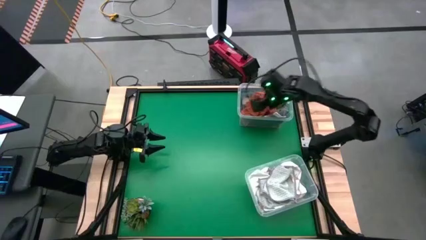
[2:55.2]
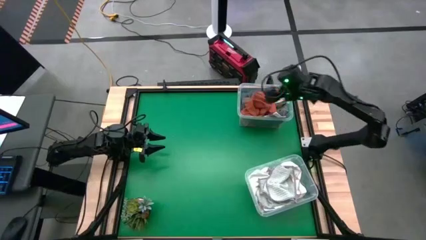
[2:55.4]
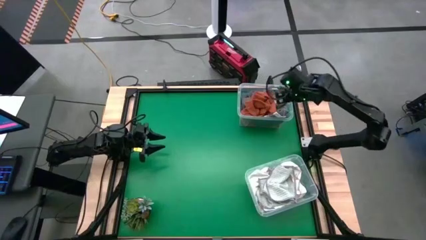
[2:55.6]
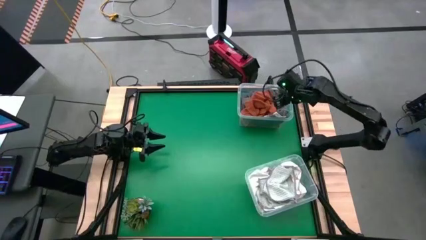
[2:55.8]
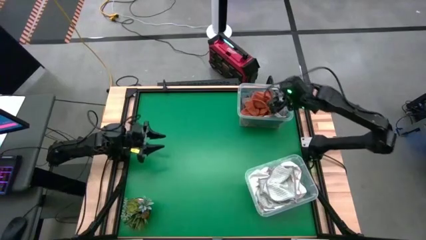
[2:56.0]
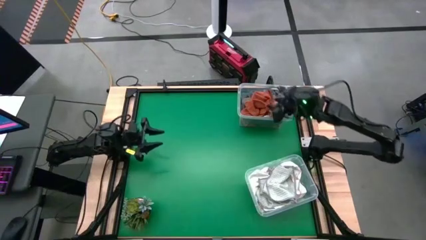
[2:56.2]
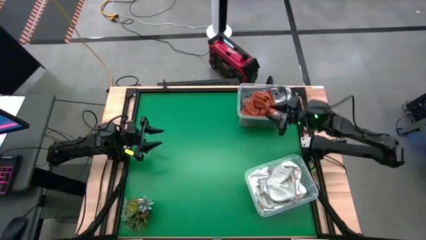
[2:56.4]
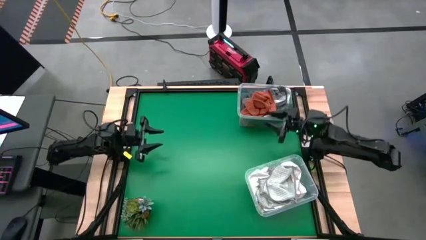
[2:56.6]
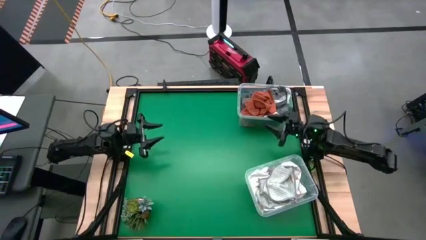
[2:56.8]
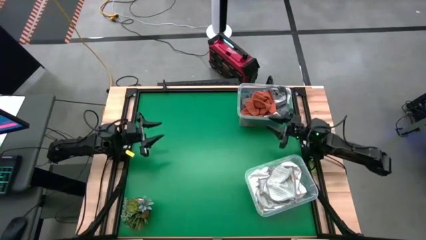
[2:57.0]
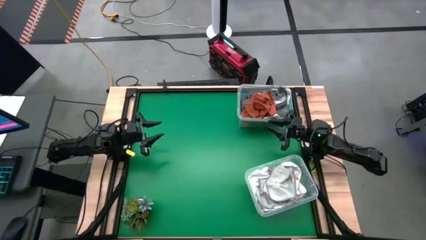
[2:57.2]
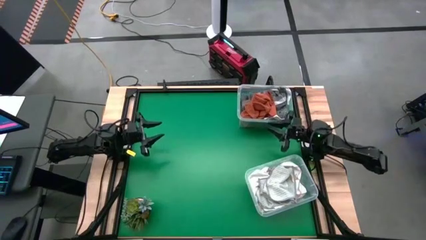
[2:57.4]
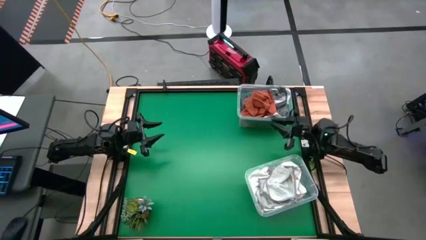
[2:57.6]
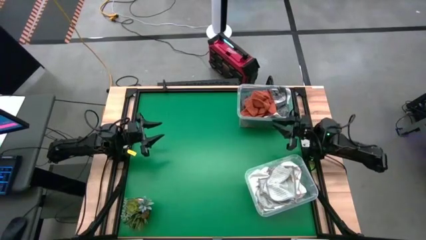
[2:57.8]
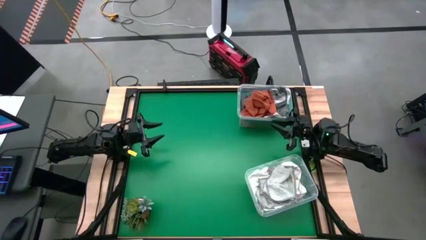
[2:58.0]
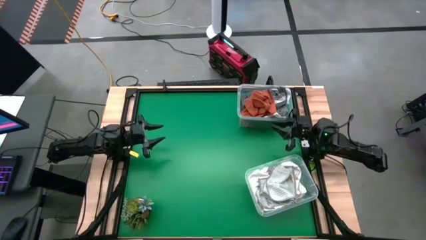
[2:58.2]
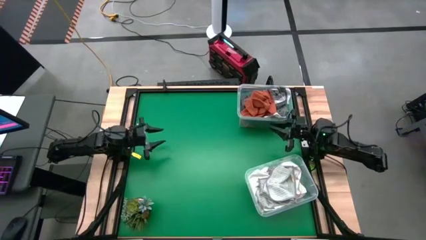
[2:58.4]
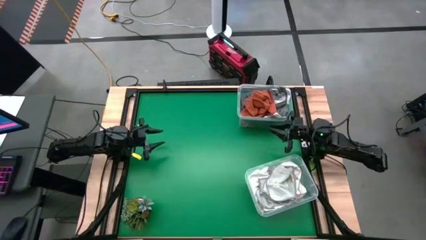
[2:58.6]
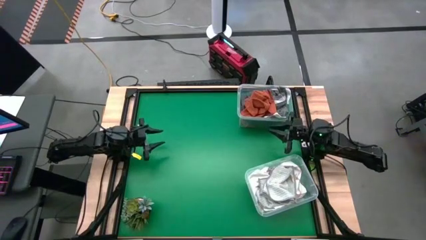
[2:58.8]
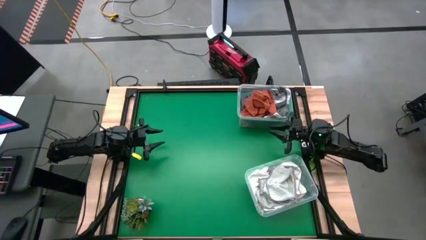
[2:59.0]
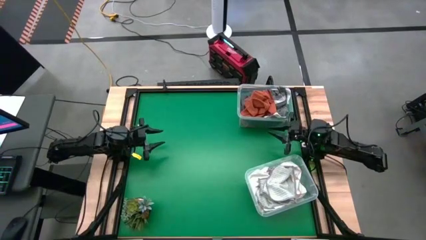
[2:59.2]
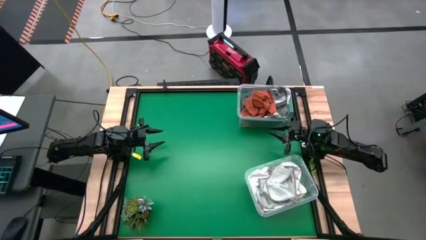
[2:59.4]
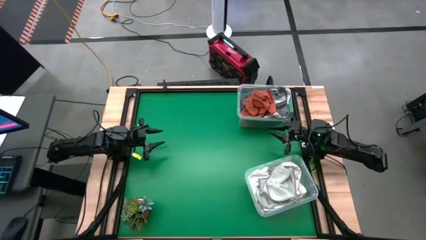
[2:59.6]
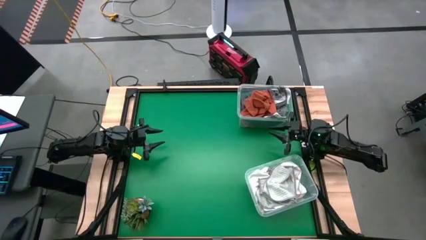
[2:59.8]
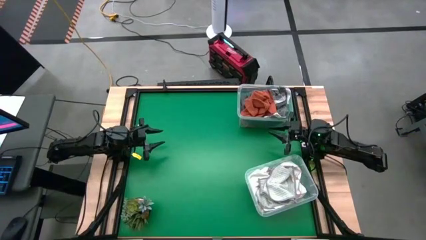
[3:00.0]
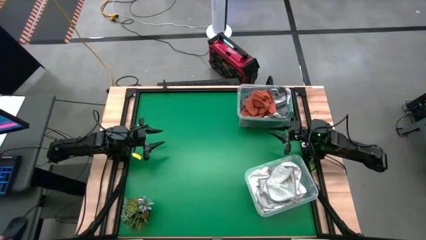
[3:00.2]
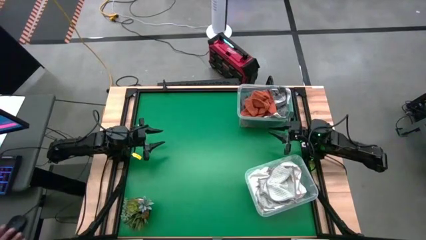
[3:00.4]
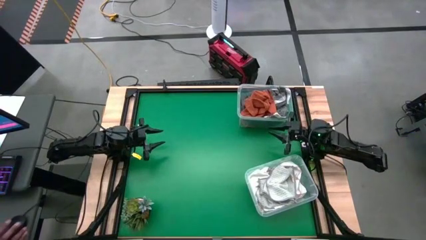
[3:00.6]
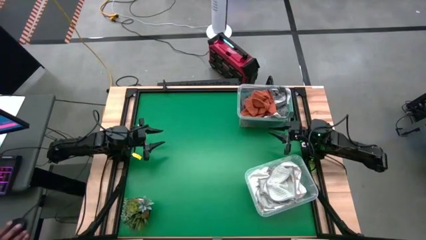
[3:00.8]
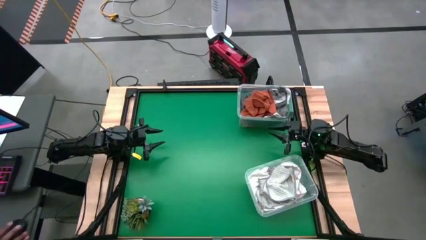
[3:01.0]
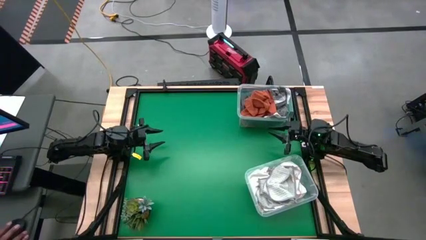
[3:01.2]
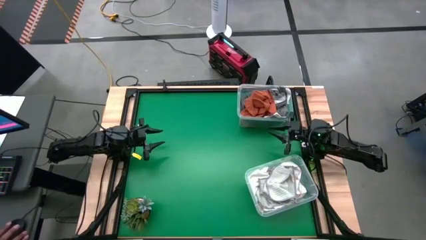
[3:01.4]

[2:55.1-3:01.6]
Task: Sort towels by color in basket
Return to Home Position

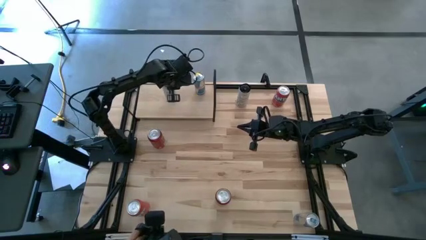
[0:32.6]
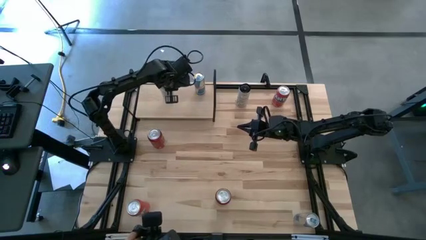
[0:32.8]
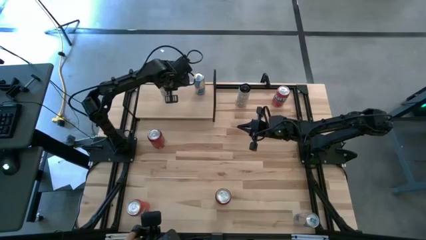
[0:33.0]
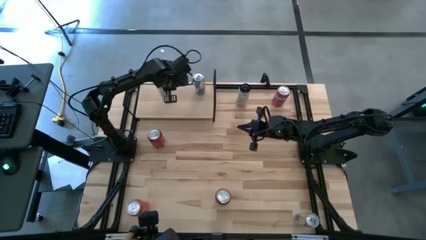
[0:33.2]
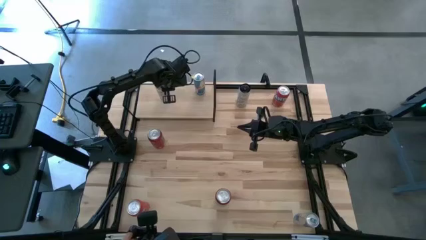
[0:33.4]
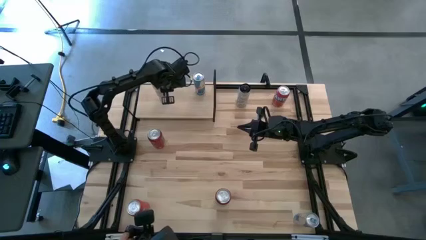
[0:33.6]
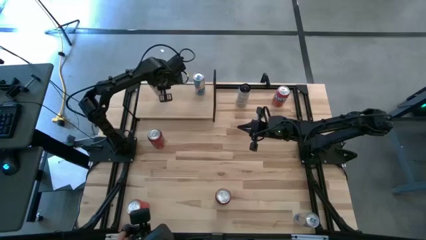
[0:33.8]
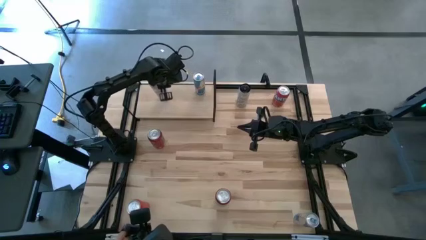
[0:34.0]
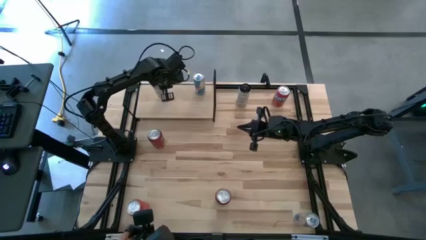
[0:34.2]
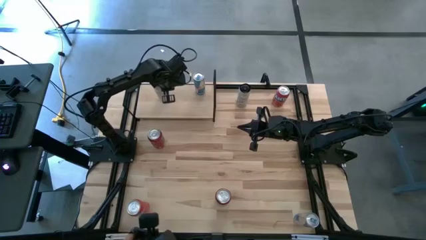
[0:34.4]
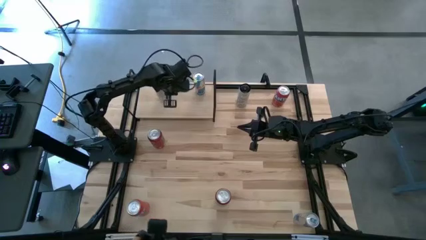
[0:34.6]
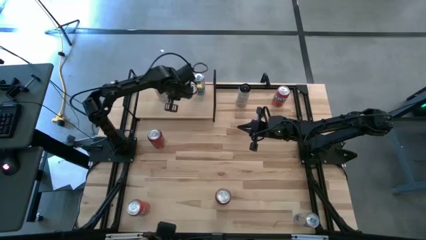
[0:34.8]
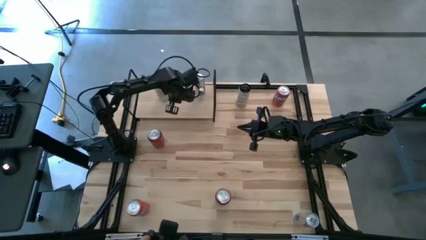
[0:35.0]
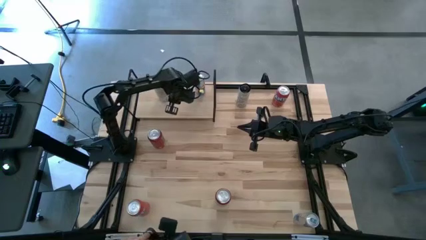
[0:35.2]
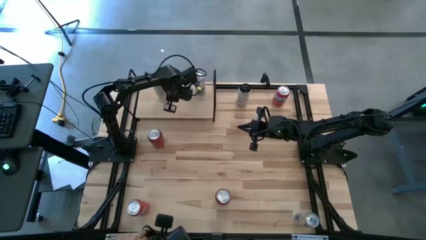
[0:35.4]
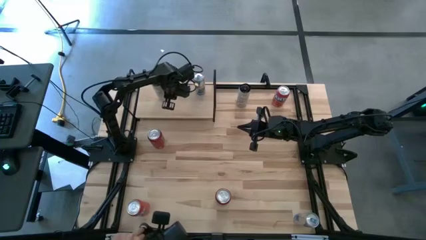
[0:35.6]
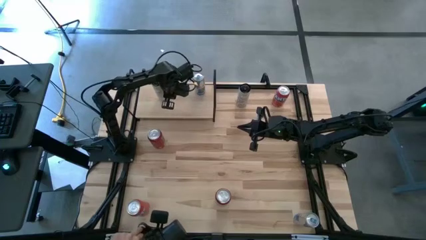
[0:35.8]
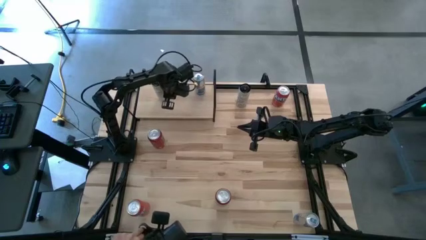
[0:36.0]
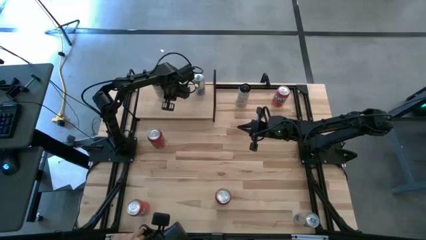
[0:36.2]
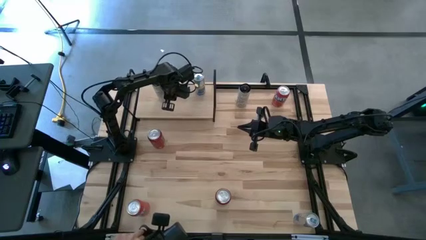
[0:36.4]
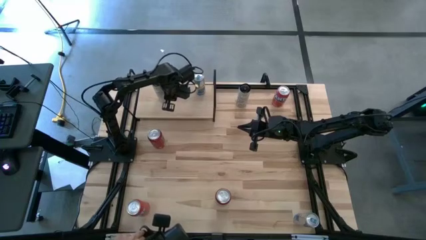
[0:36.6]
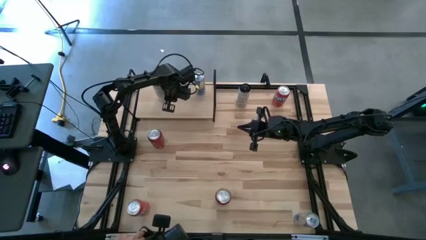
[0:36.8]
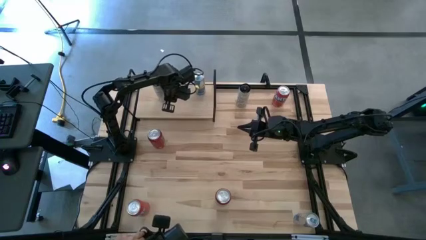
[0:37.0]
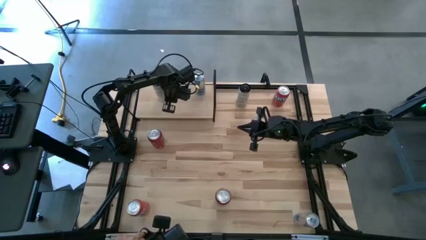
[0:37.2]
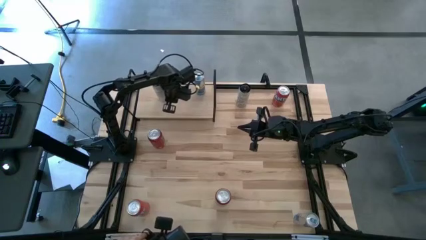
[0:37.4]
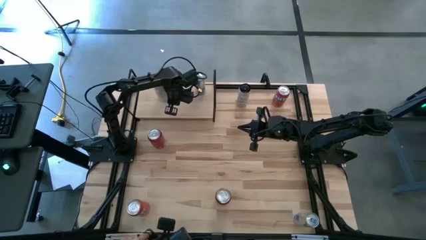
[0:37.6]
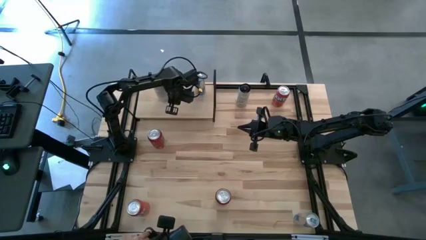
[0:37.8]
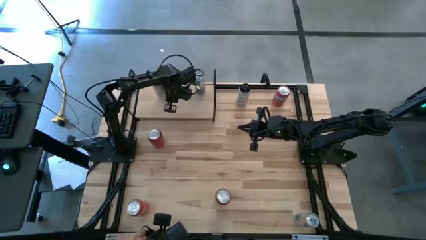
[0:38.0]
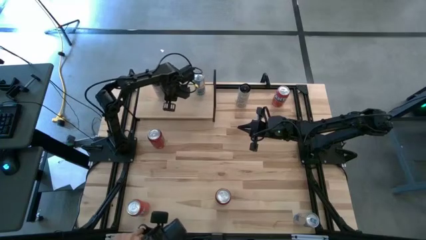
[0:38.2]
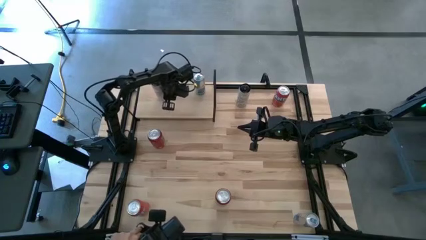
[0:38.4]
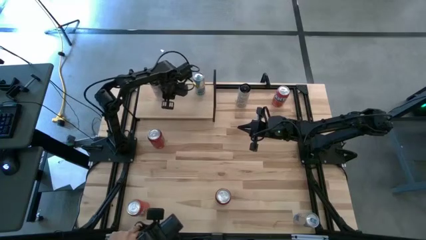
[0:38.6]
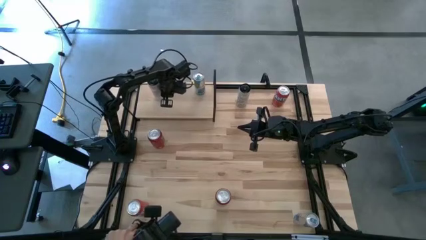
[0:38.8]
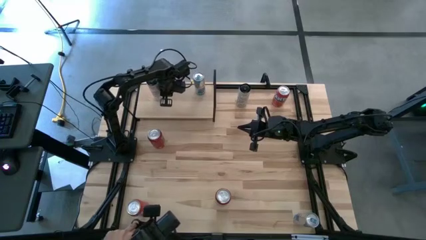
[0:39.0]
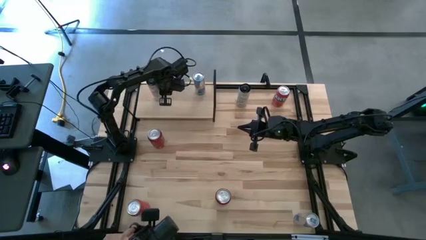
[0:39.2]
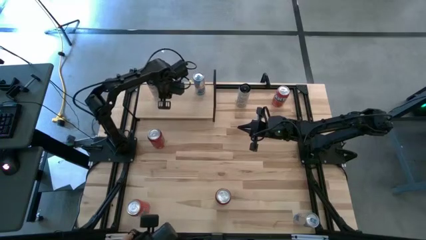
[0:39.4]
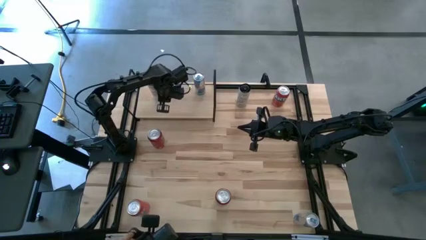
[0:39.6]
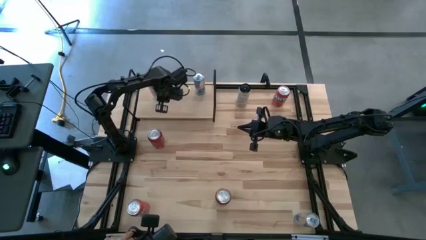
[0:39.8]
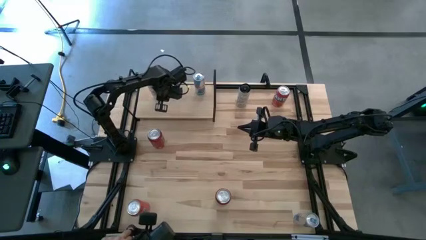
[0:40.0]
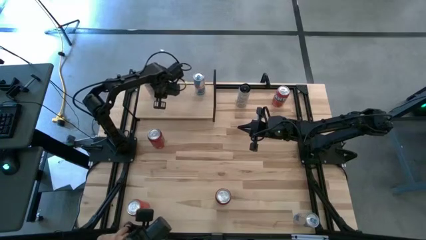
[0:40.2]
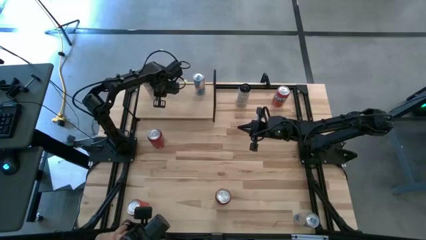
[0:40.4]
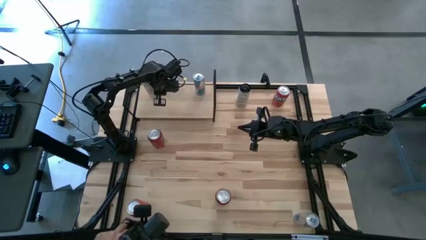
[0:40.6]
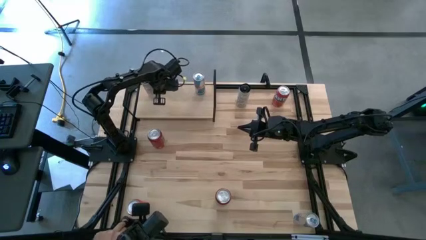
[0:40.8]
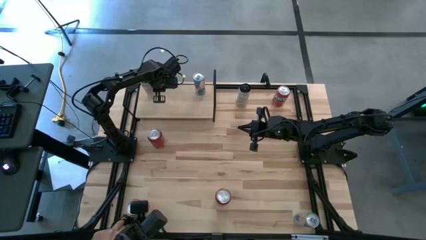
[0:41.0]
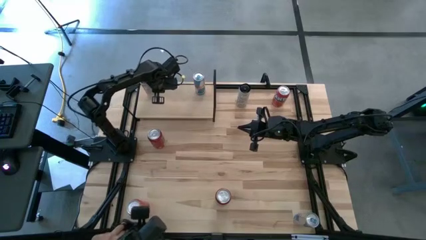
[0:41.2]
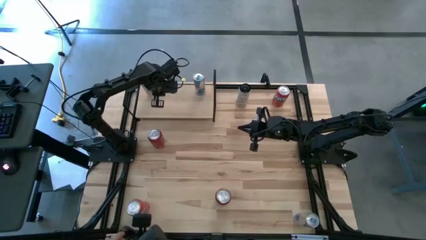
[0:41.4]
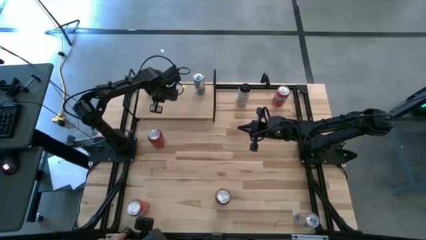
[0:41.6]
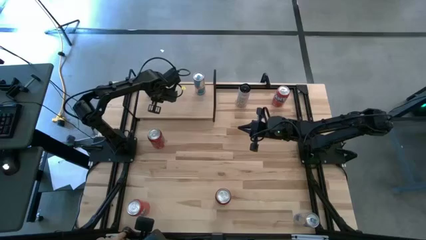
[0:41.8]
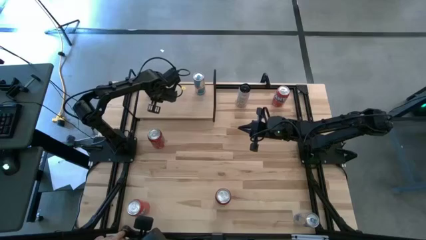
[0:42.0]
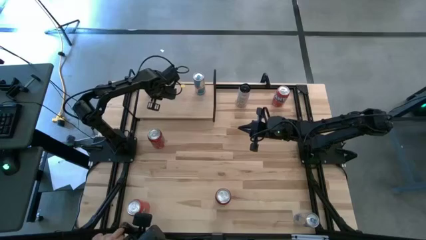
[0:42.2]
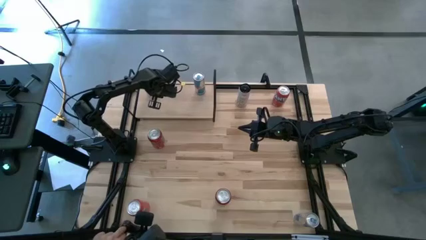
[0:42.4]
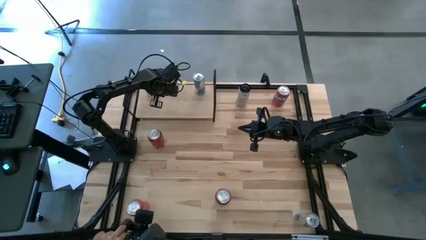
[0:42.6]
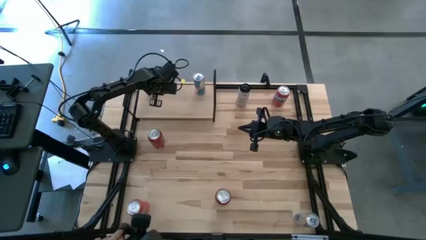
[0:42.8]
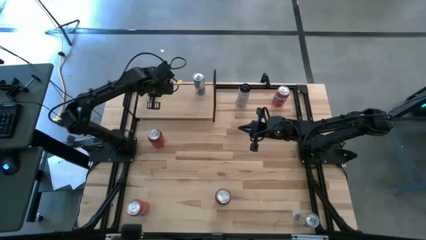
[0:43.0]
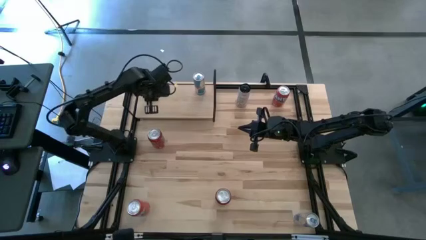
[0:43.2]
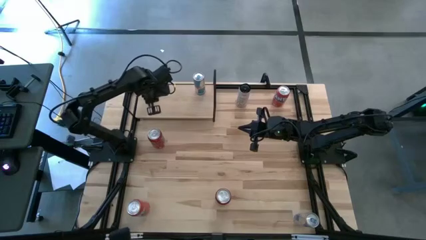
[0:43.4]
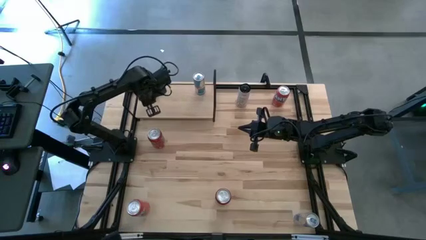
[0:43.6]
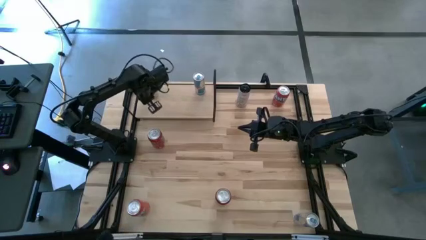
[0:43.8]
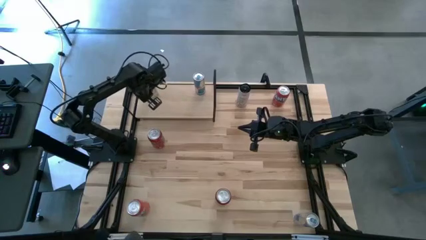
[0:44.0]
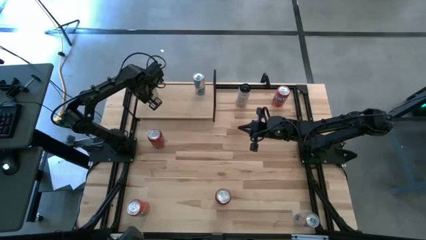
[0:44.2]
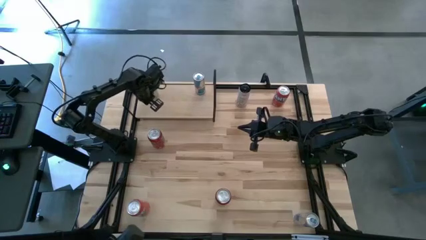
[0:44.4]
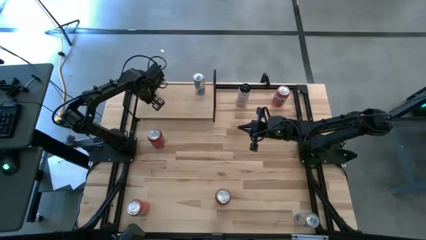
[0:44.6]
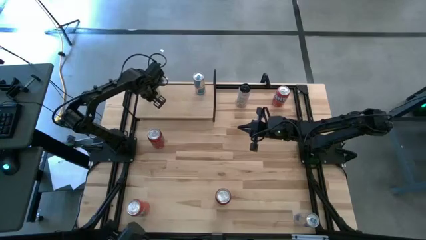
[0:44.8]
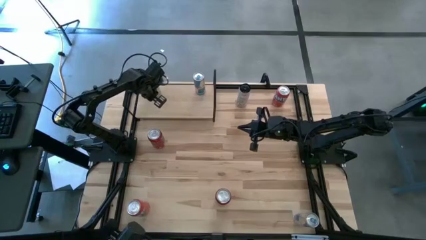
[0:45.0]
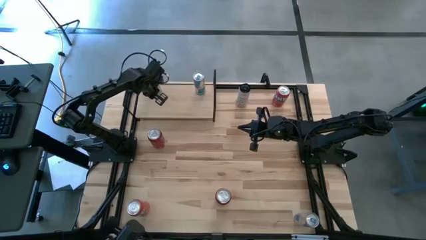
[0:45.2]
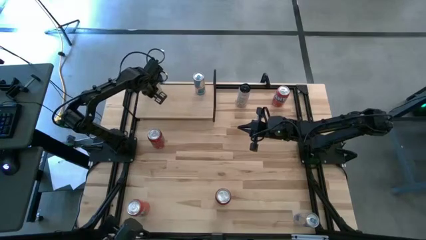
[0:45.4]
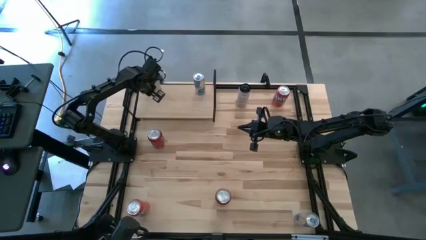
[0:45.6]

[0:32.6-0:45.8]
Task: Place canned beverage on shelf
Put the bottom white and yellow soda can on the shelf
